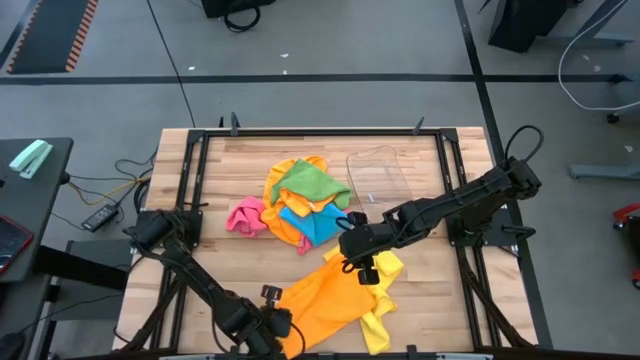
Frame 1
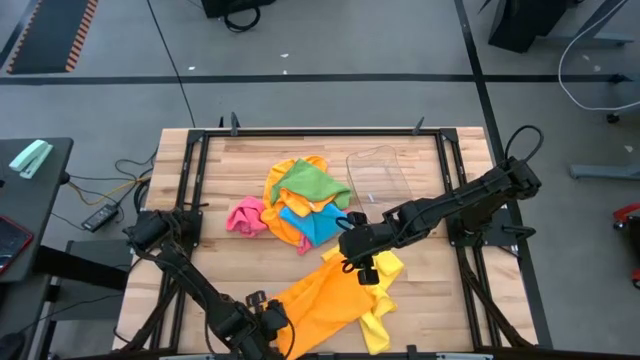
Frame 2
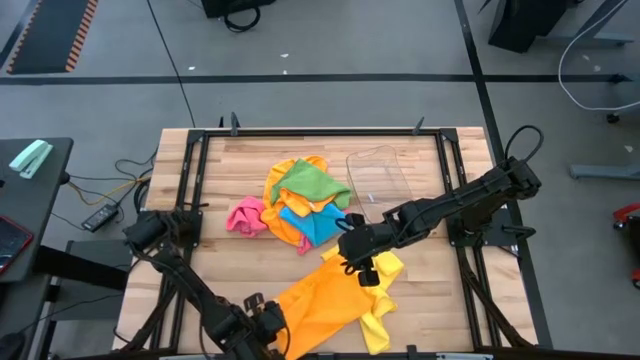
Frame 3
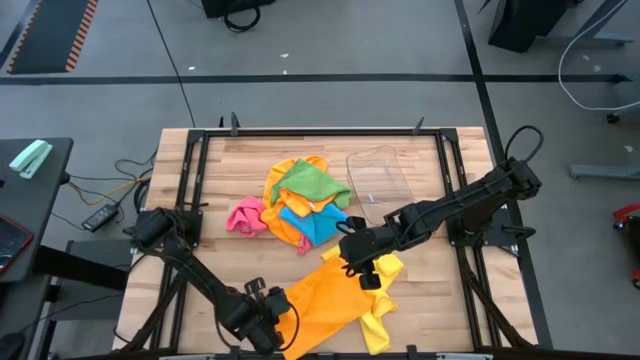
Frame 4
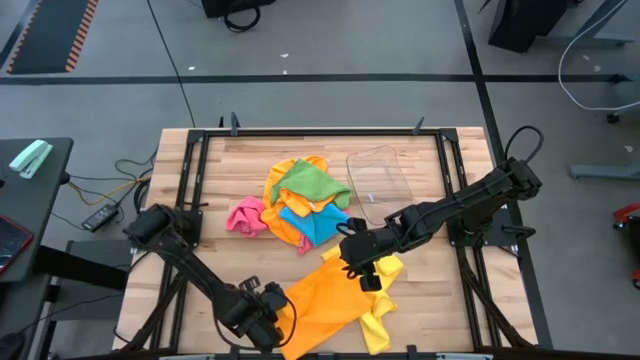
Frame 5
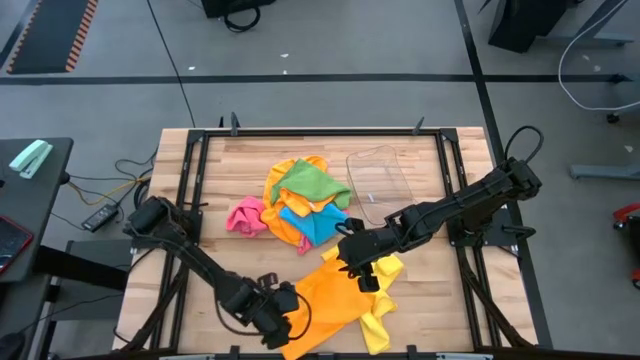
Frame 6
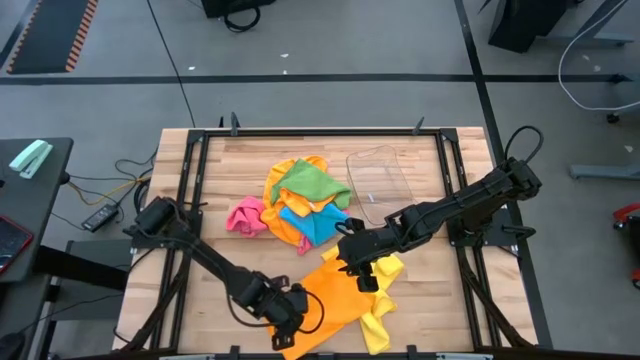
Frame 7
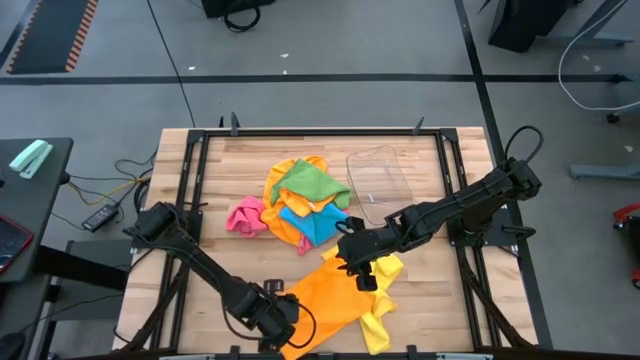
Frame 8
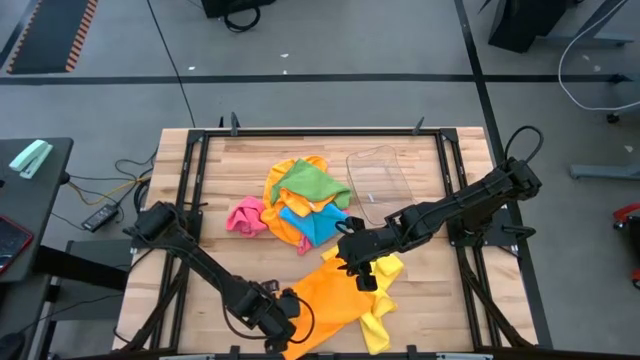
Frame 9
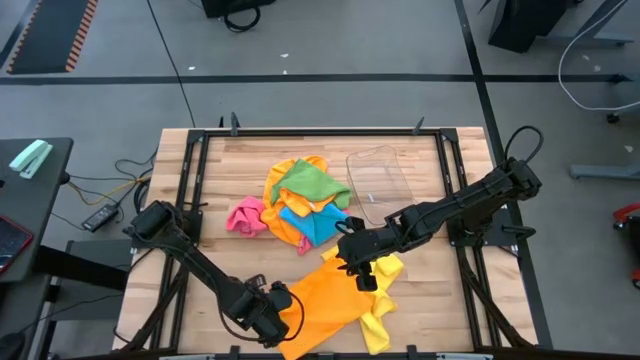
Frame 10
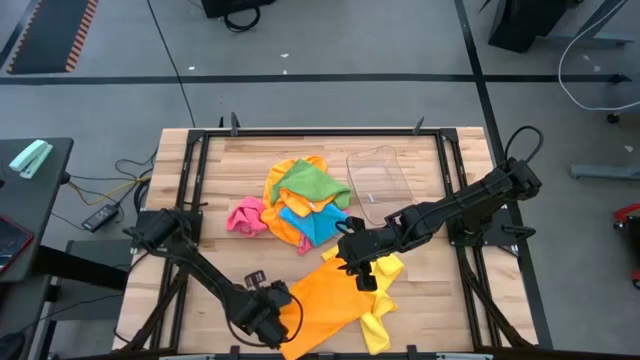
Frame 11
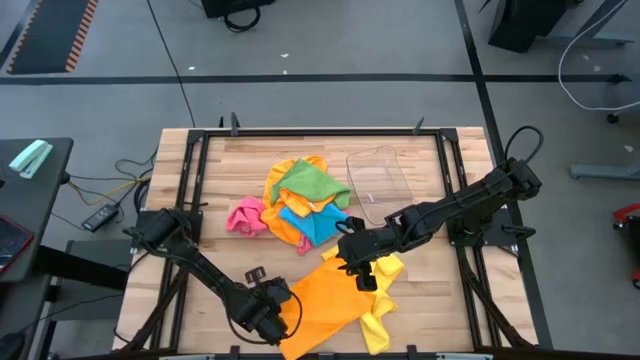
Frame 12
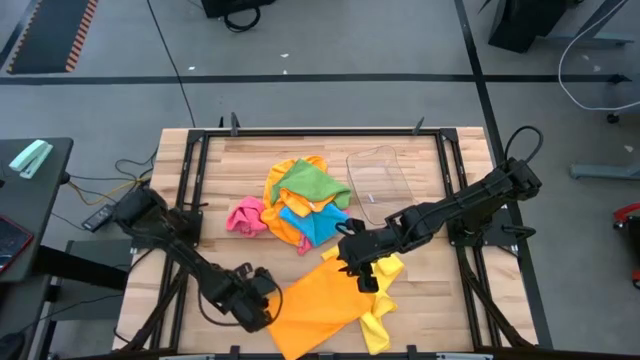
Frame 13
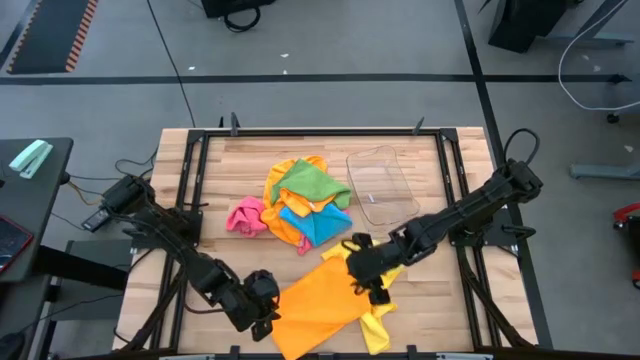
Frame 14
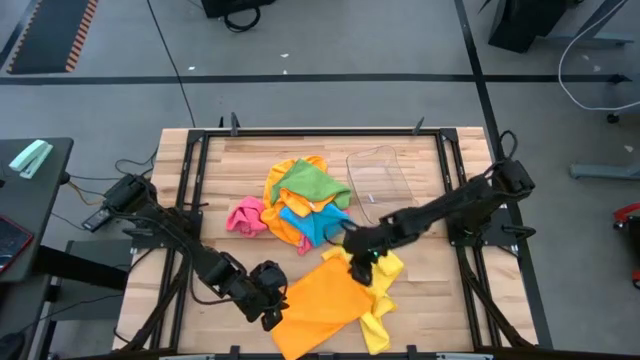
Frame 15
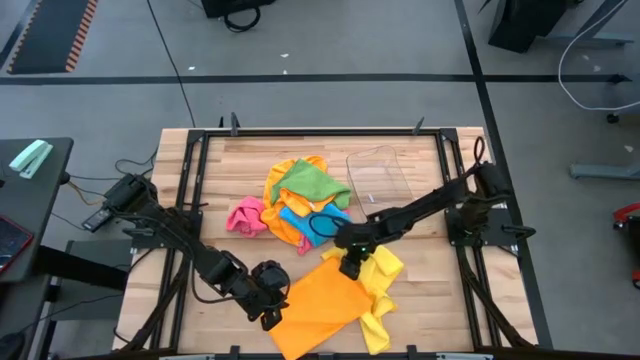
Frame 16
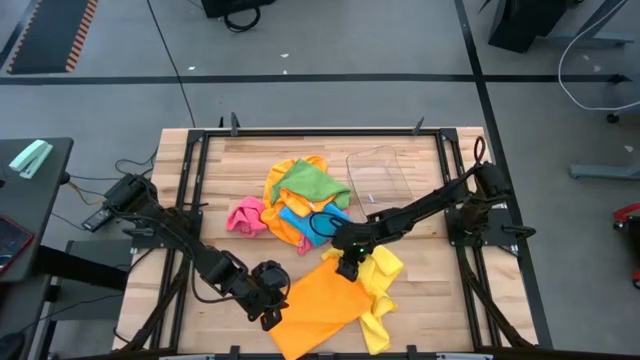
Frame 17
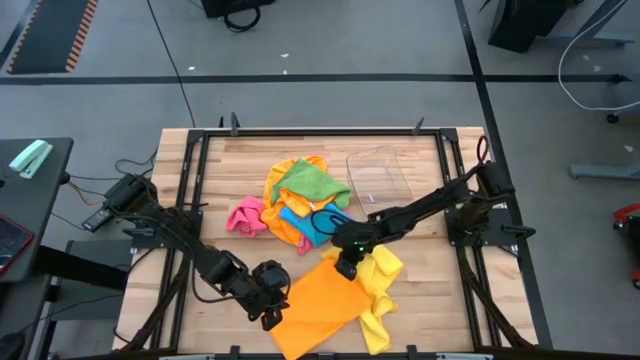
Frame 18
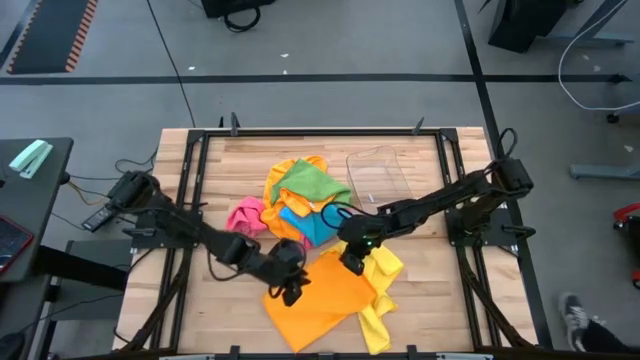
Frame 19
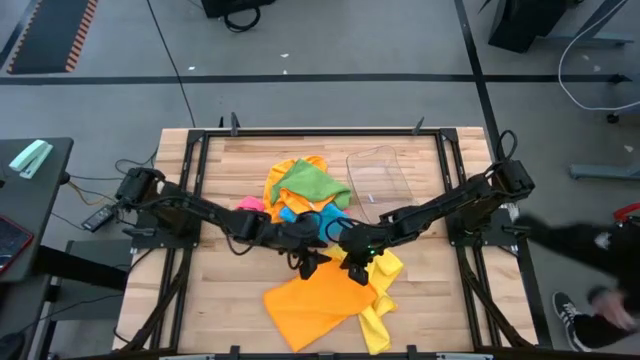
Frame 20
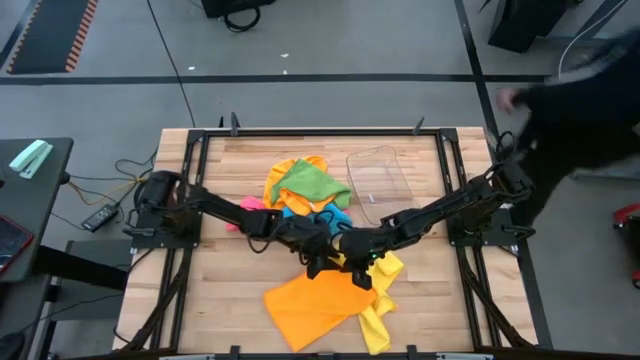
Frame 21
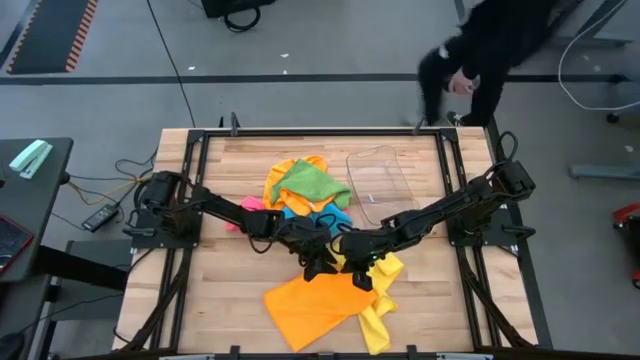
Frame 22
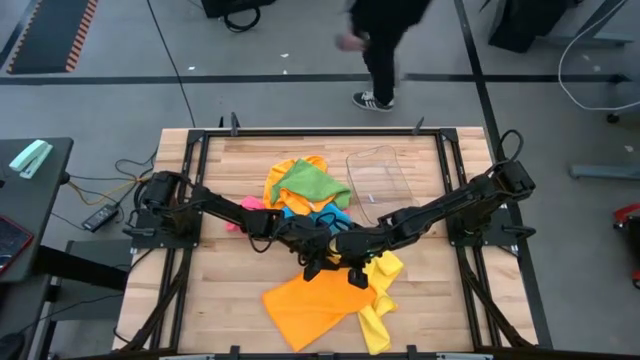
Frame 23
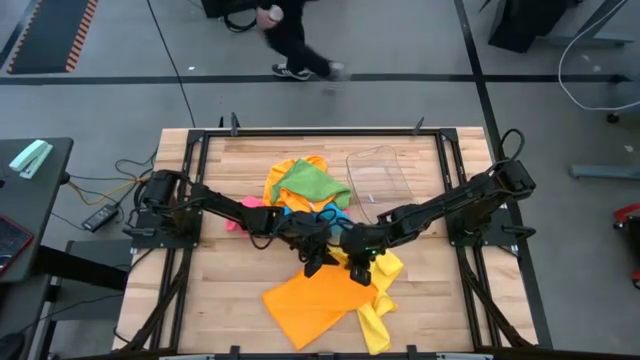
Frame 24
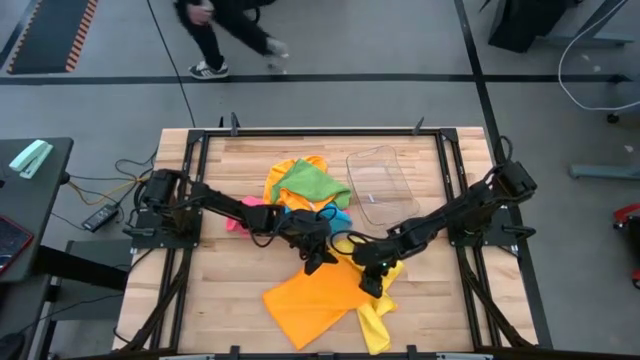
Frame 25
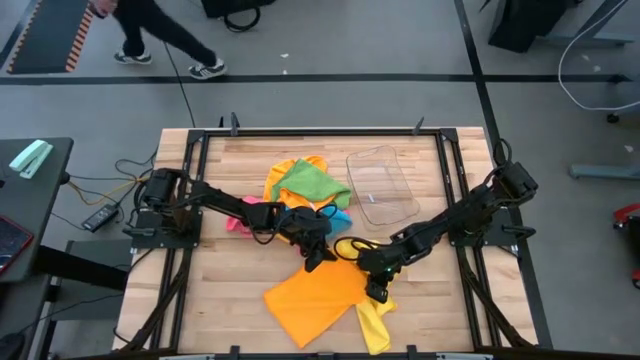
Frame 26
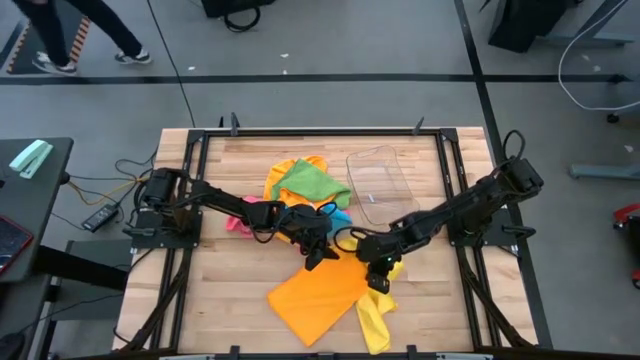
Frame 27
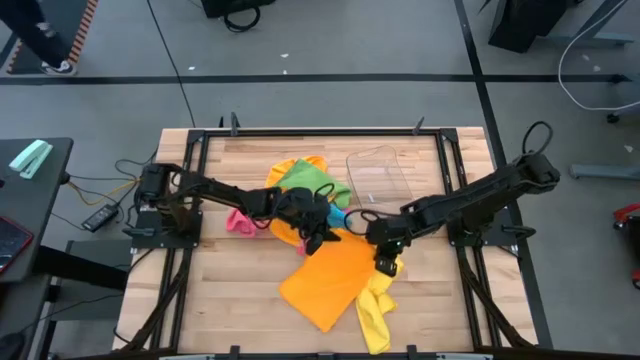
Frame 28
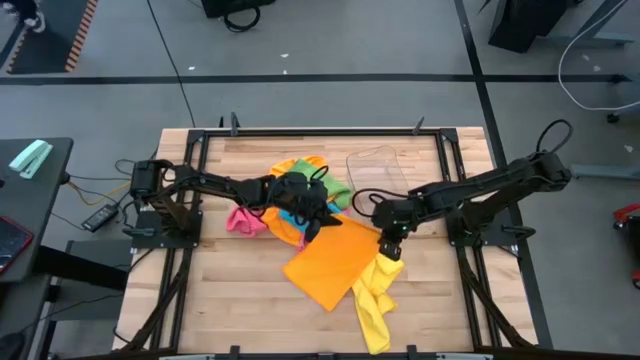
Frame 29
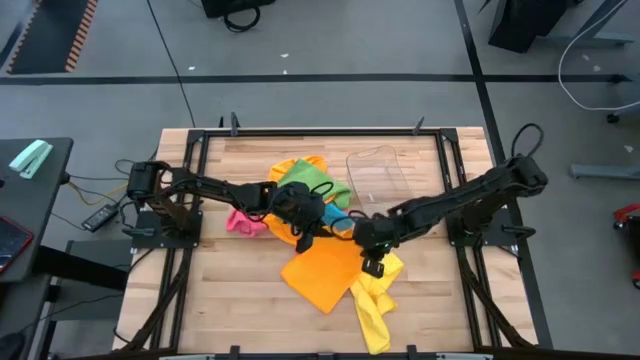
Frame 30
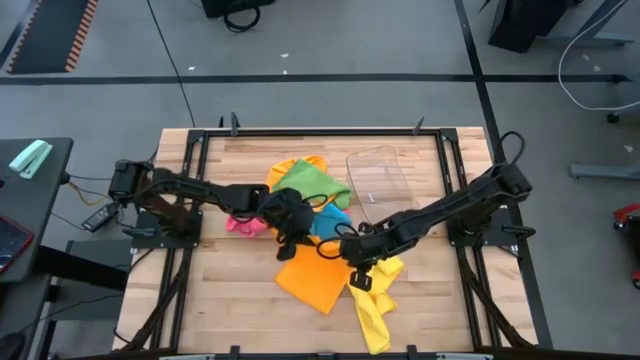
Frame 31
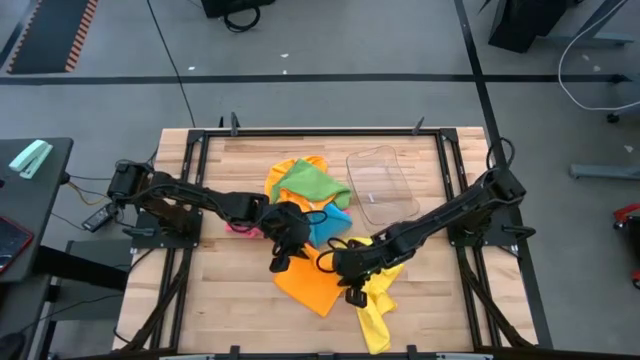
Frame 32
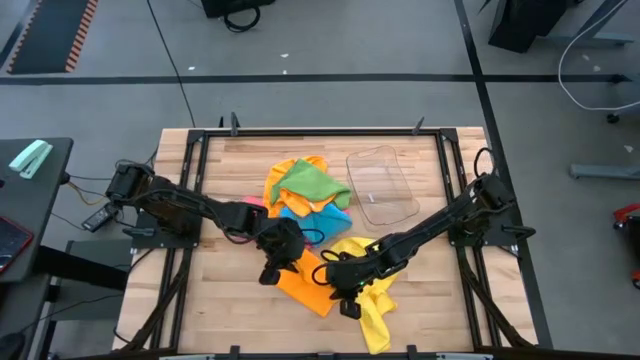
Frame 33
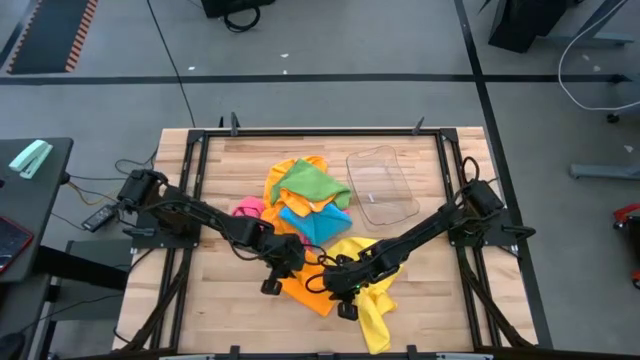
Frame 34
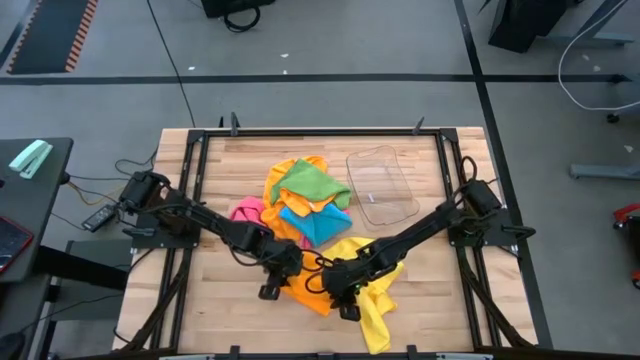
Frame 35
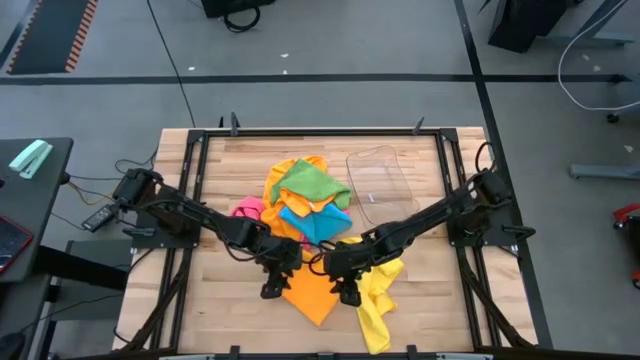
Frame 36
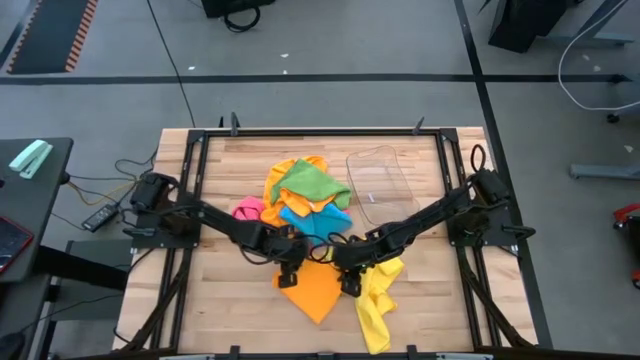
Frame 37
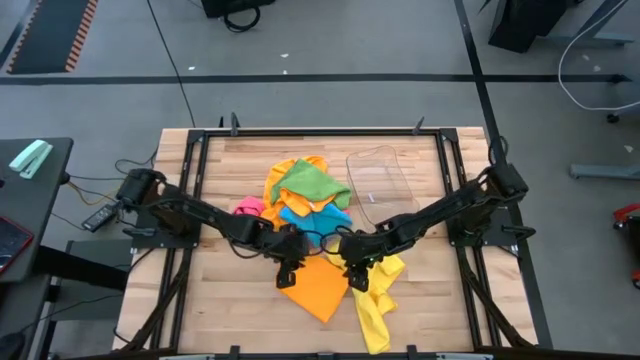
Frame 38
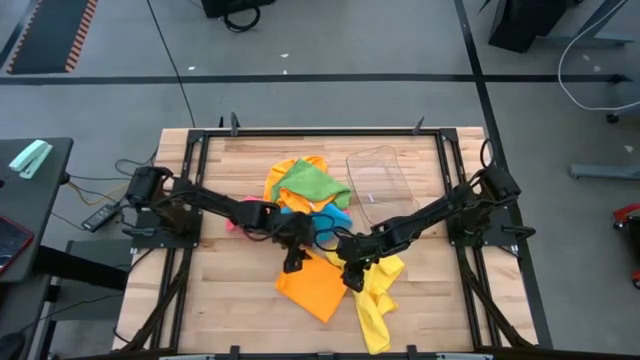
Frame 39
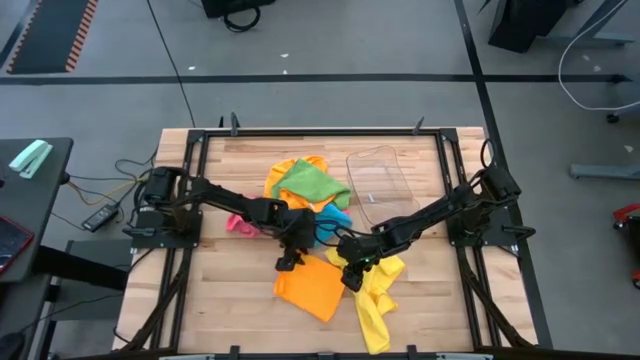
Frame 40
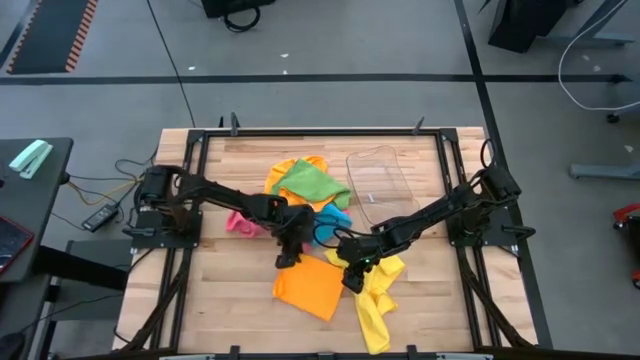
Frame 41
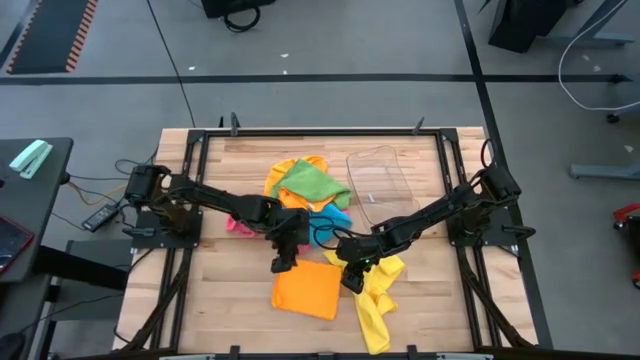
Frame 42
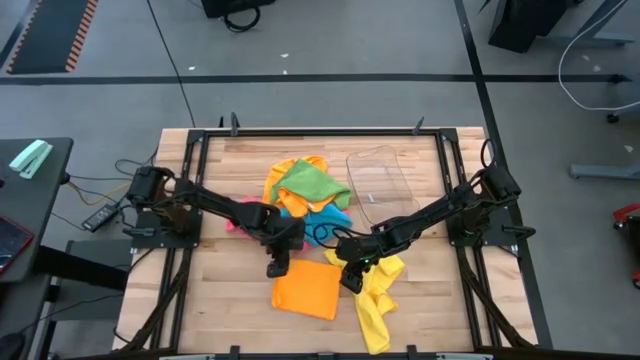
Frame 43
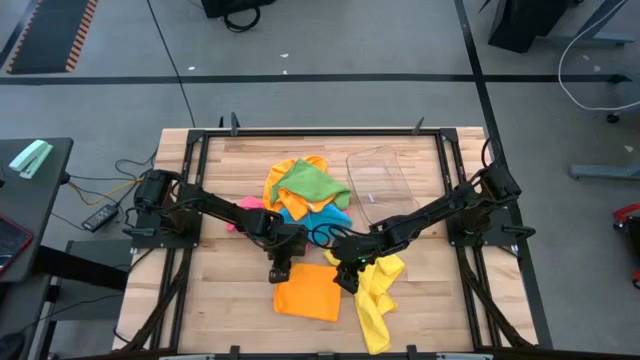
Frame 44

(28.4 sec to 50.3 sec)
Task: Fold microfiber towels
Fold the bottom orange towel
